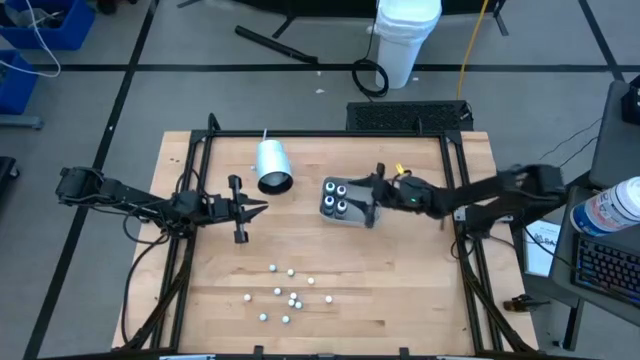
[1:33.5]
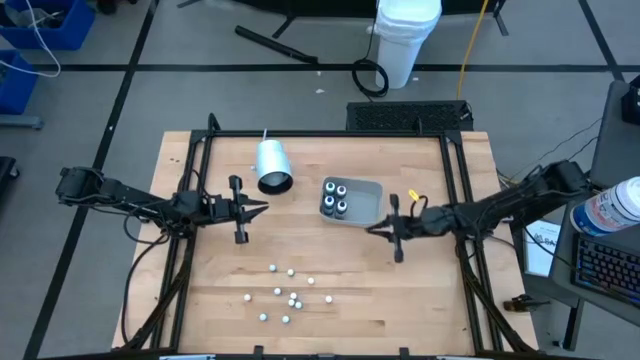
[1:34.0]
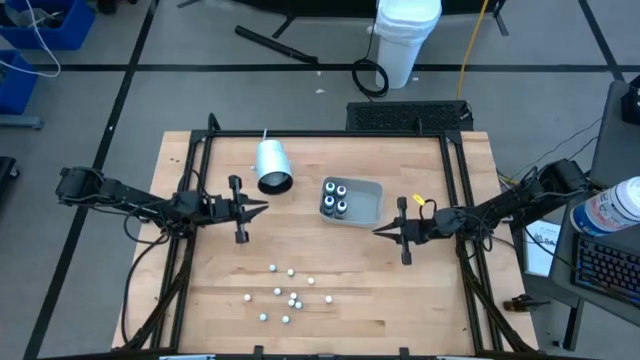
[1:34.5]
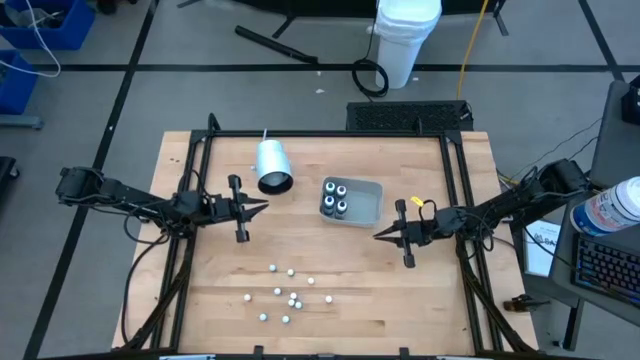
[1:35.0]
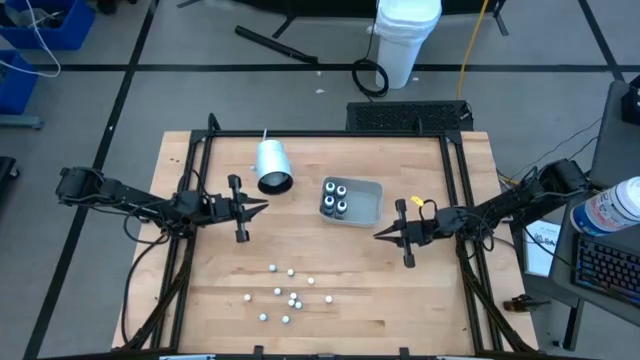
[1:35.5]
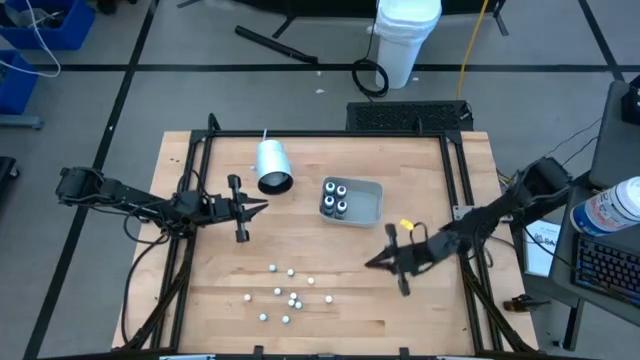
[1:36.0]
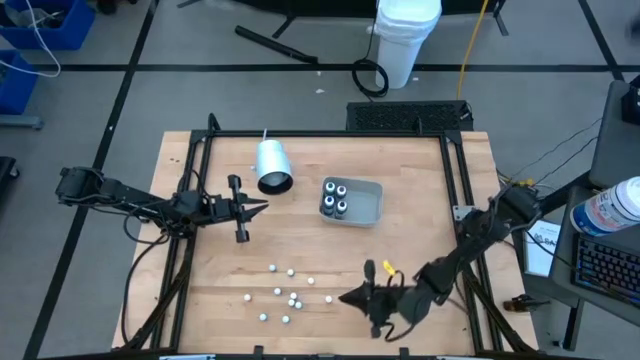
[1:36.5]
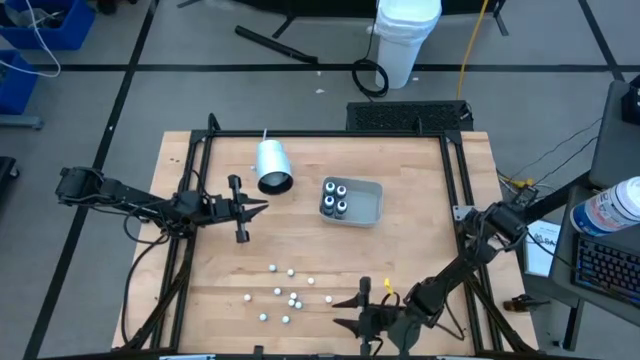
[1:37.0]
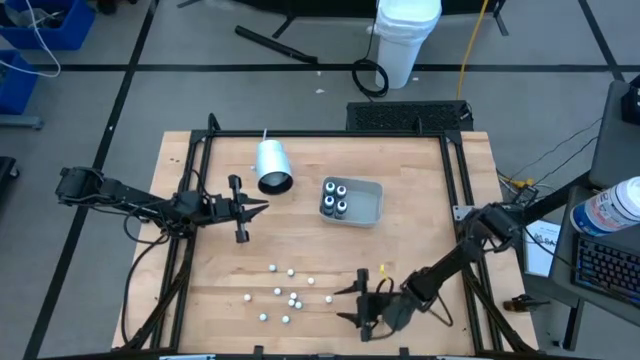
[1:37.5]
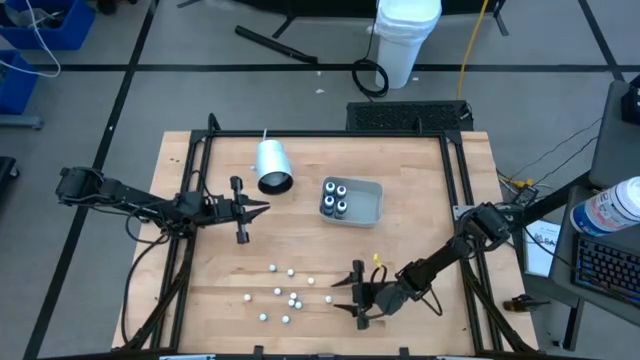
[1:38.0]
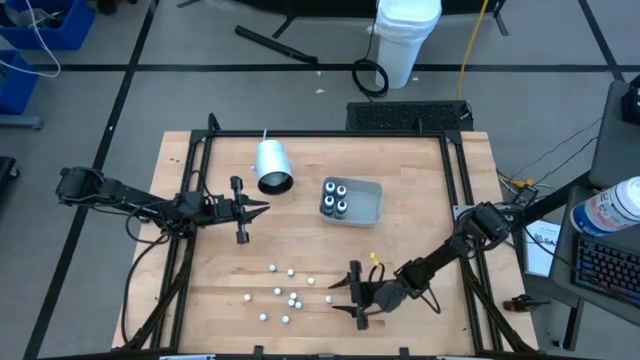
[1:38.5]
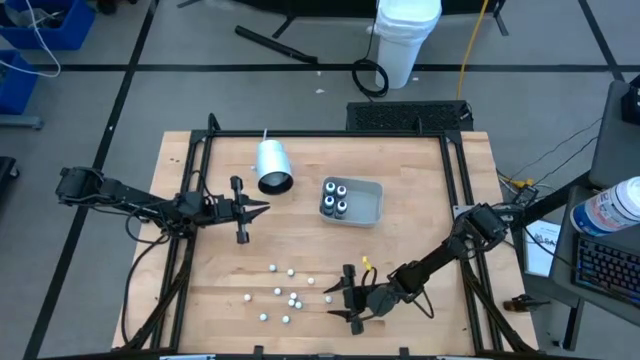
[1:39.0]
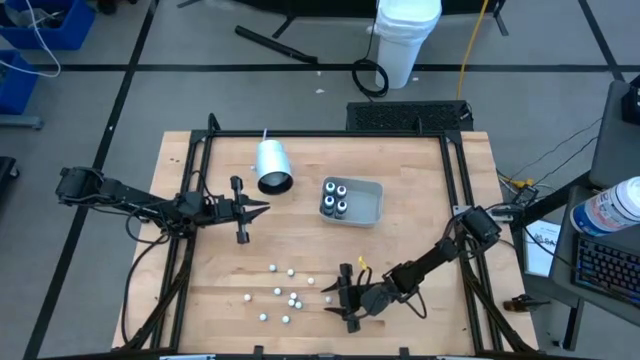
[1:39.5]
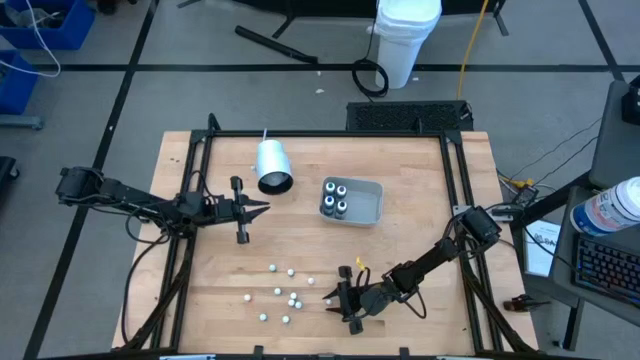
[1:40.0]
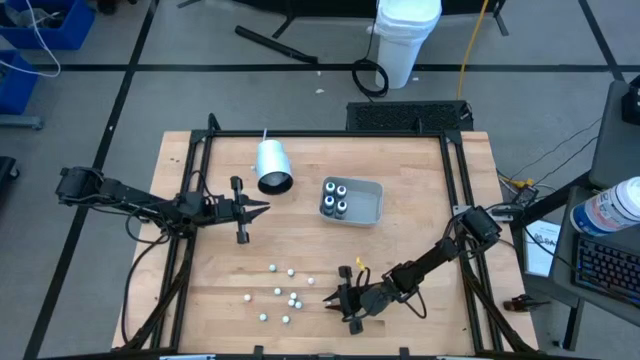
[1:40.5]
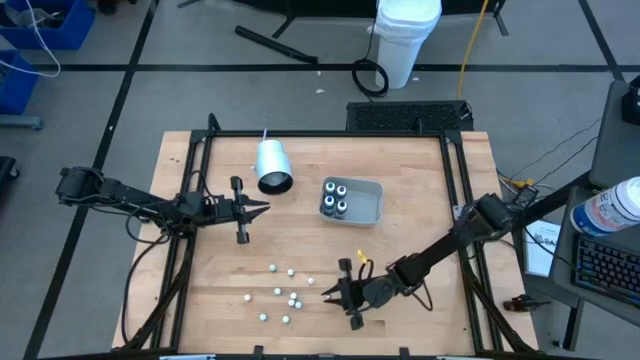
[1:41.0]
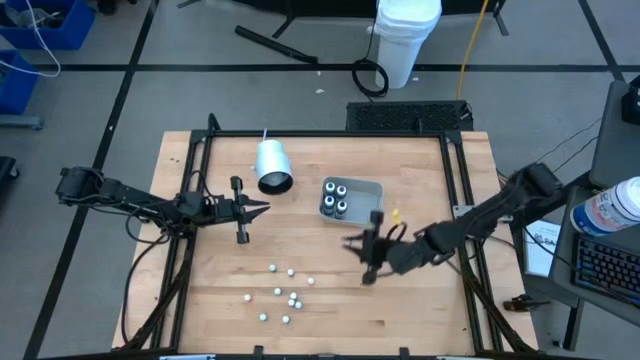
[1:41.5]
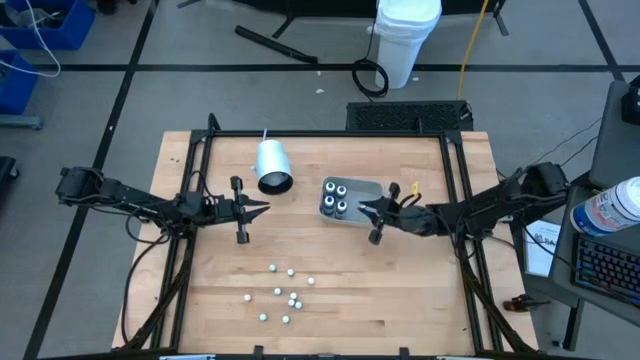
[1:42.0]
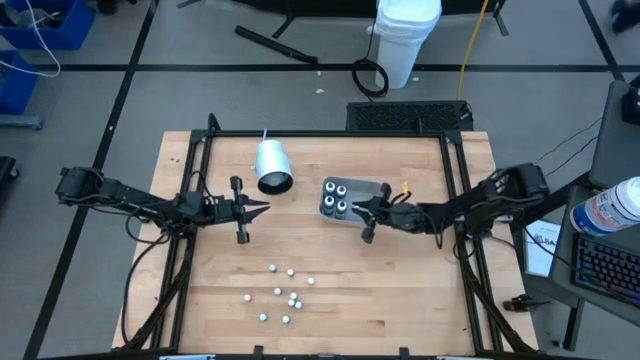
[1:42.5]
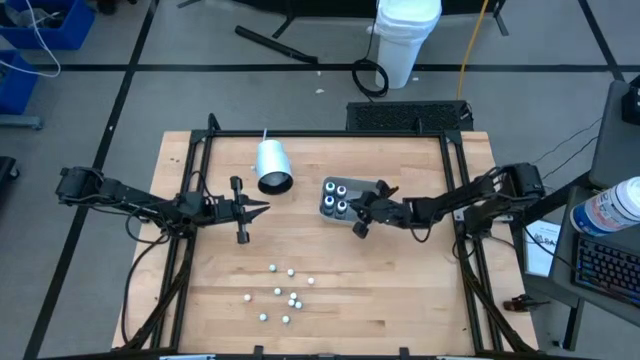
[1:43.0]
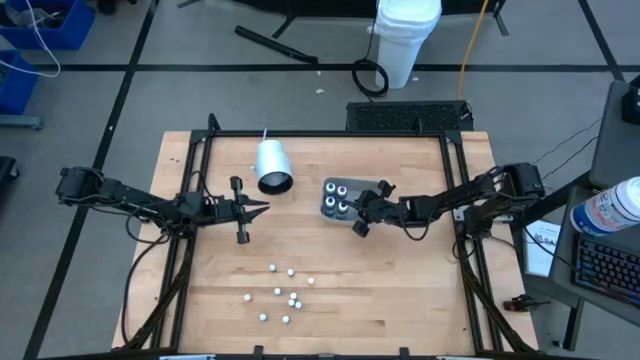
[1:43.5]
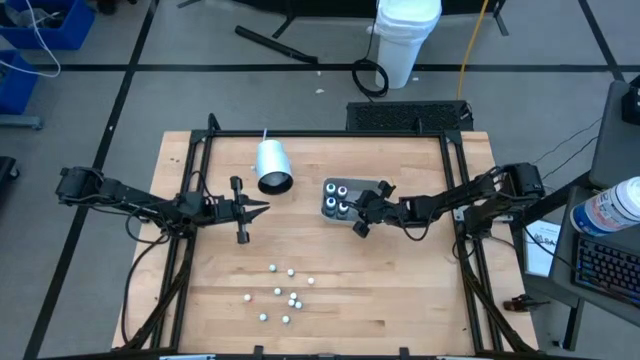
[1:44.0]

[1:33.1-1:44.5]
Task: Pick & Place food coloring
Put the orange food coloring bottle into the gray bin

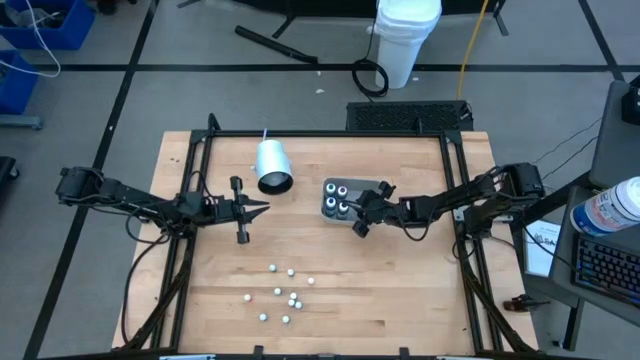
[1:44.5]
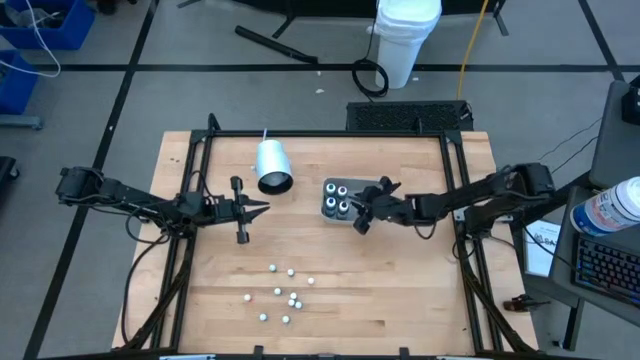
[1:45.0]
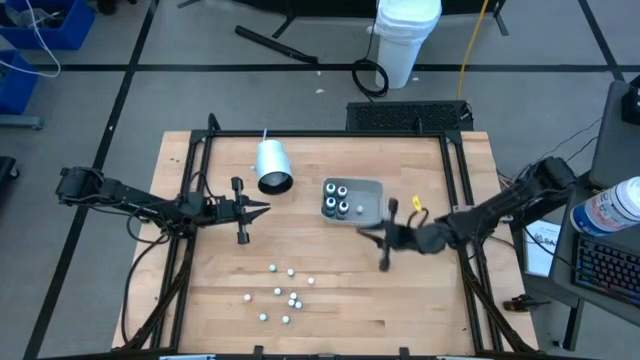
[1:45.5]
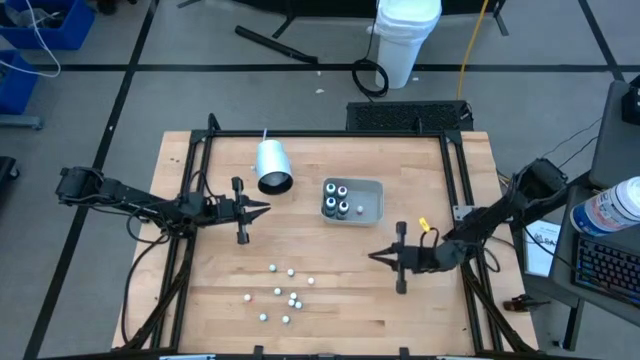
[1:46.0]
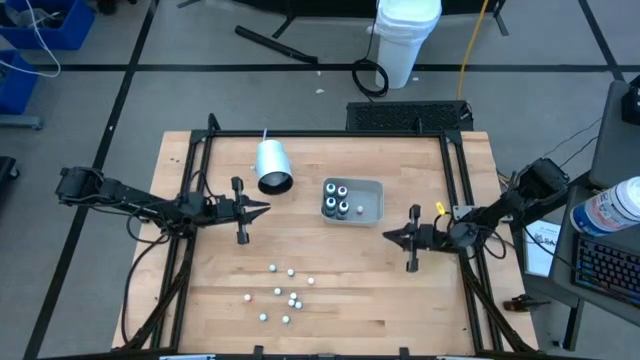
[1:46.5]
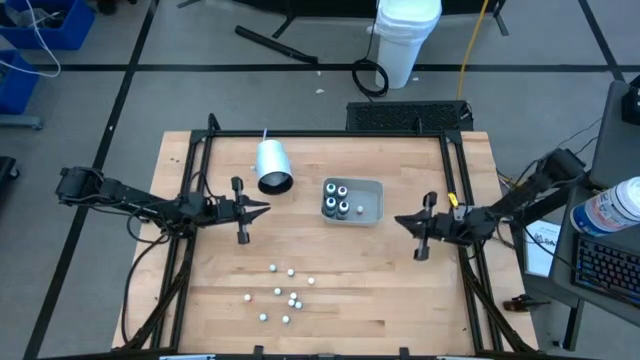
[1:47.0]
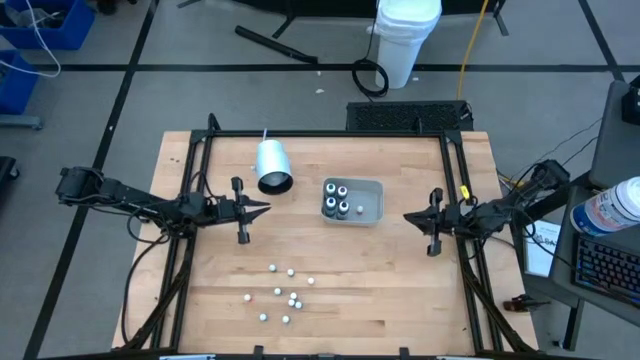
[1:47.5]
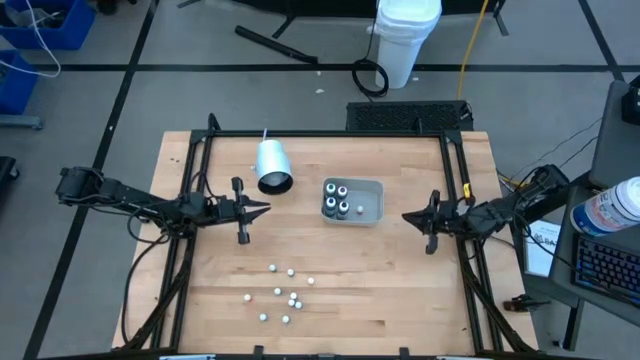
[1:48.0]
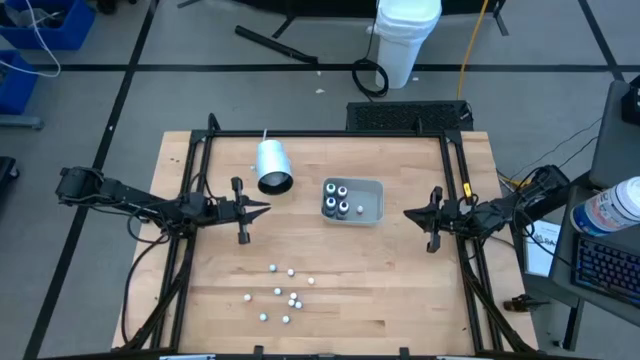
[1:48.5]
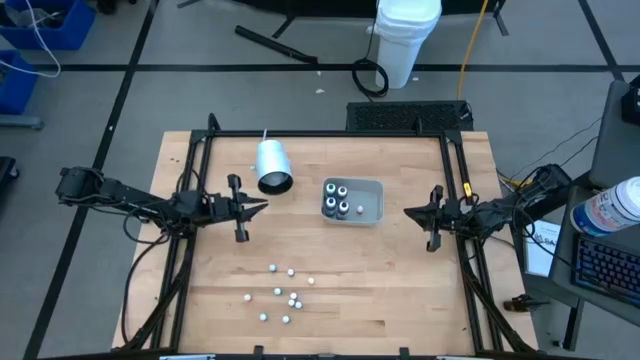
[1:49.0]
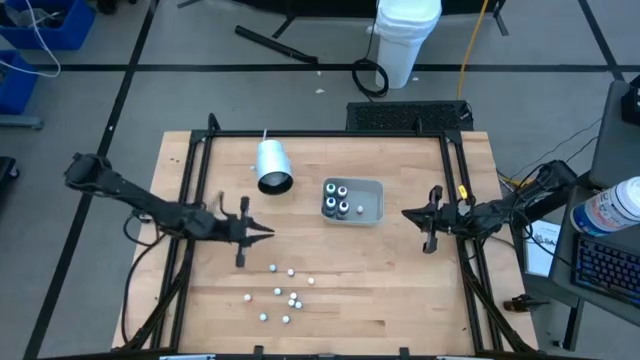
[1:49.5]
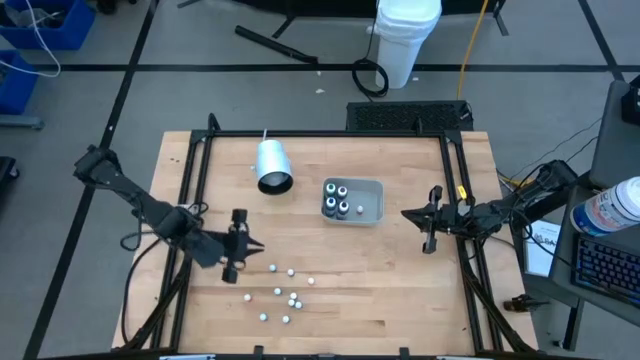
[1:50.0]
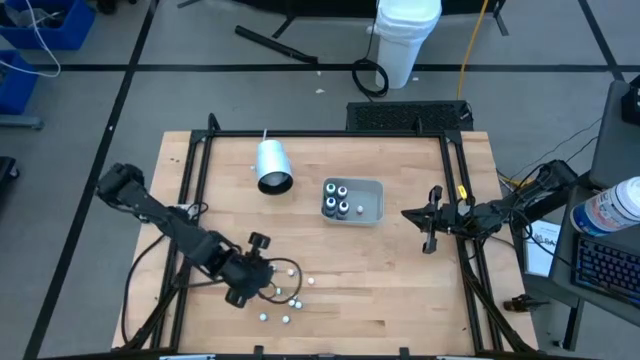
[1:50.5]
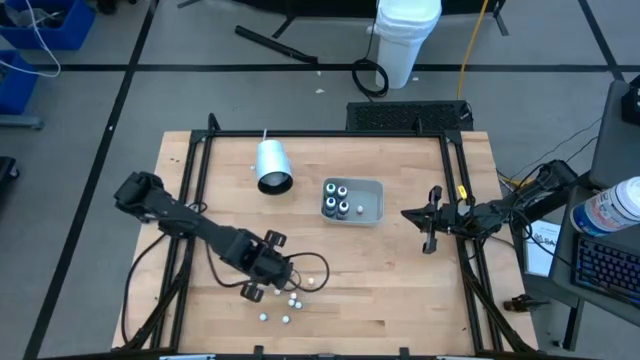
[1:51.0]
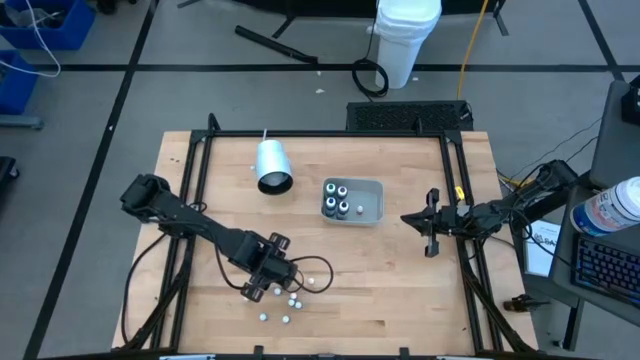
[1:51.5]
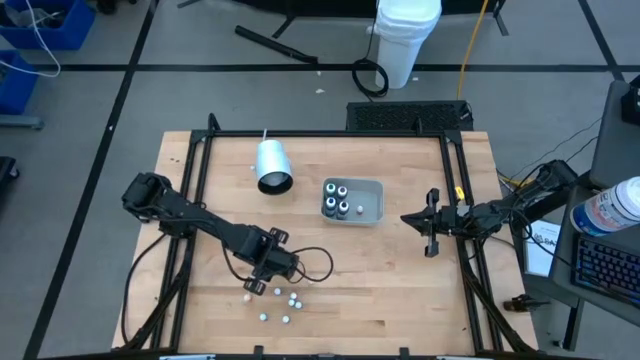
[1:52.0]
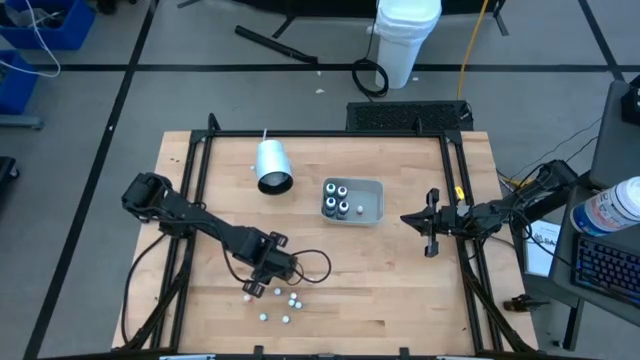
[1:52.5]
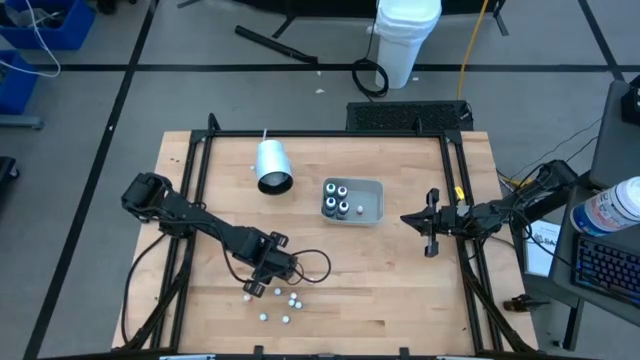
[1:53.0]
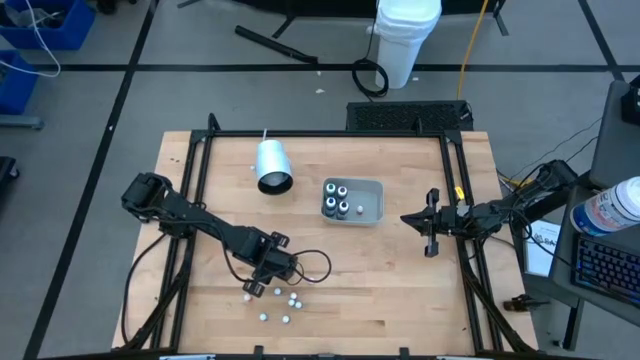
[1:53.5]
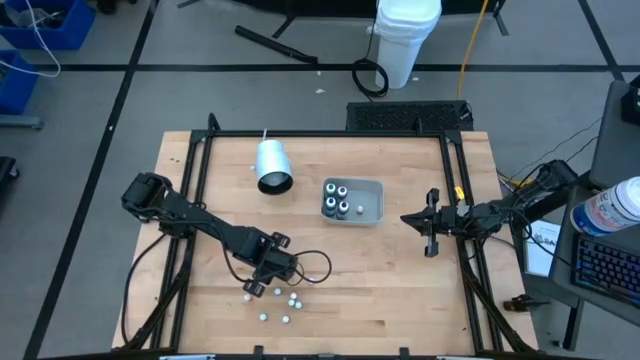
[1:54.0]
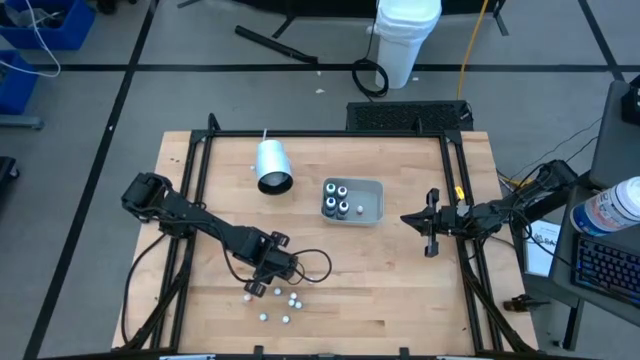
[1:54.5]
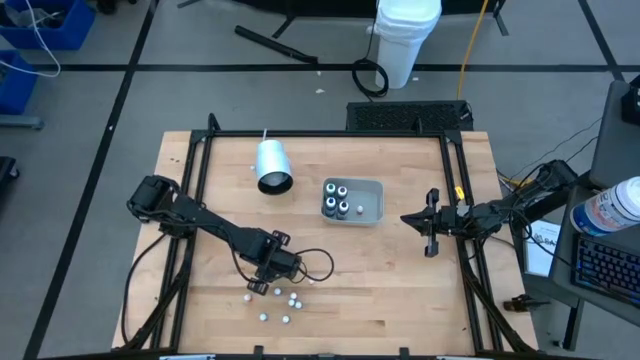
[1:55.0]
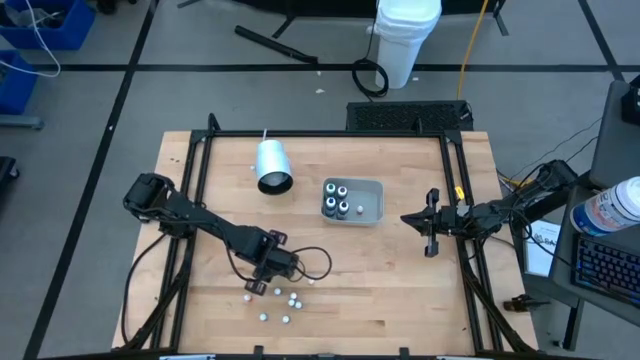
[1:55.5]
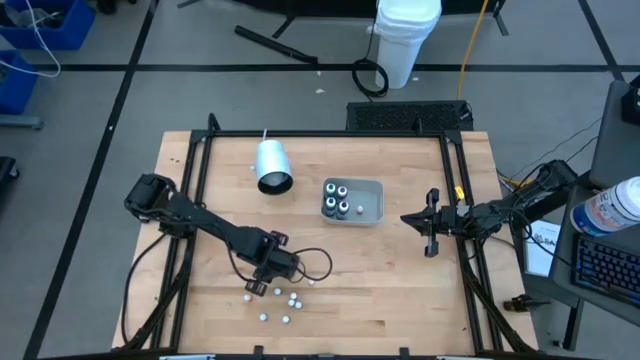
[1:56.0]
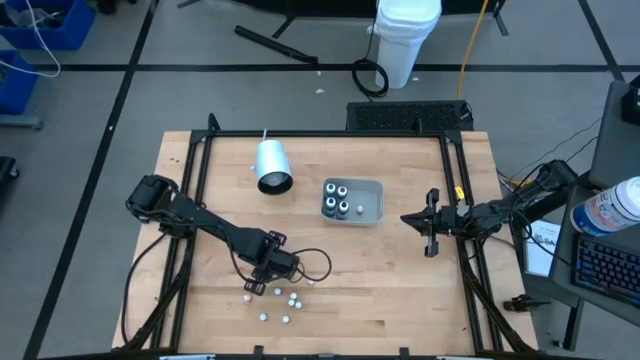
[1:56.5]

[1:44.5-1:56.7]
Put the blue food coloring bottle into the gray bin
